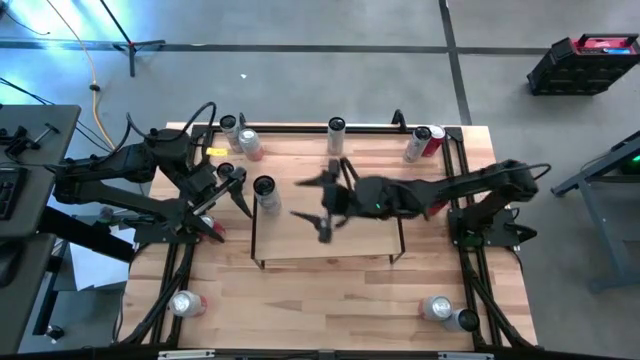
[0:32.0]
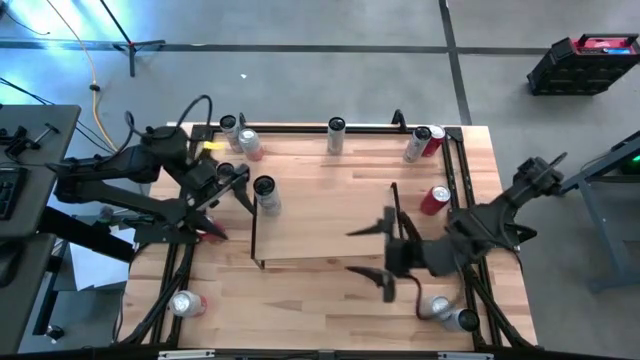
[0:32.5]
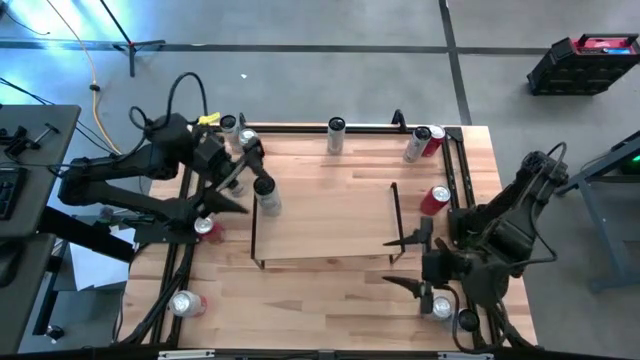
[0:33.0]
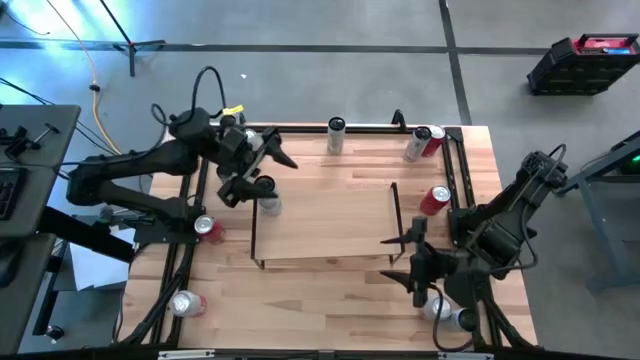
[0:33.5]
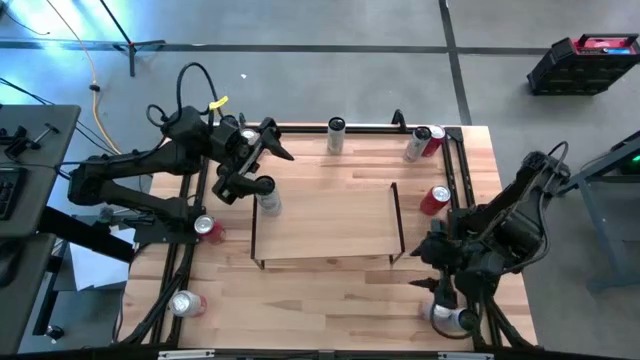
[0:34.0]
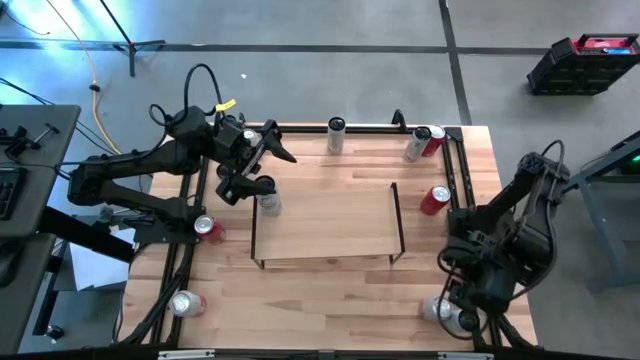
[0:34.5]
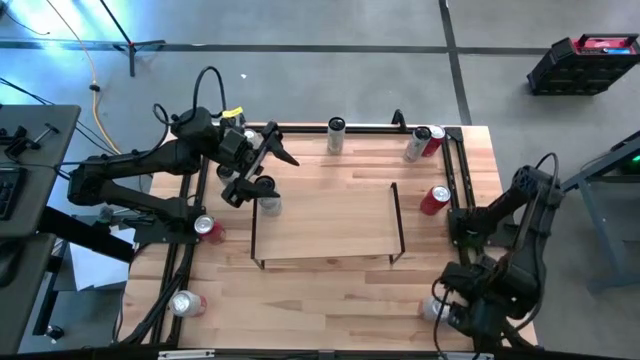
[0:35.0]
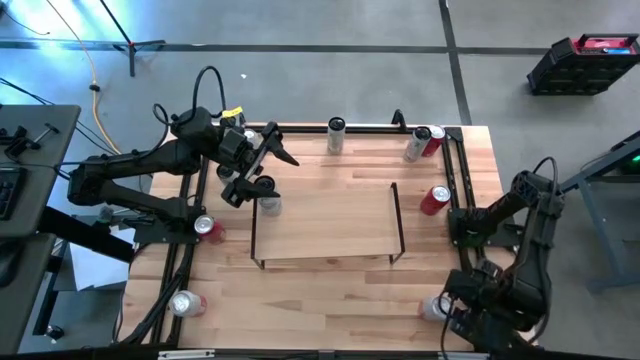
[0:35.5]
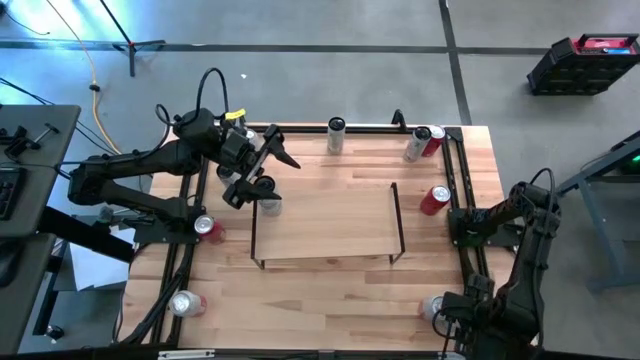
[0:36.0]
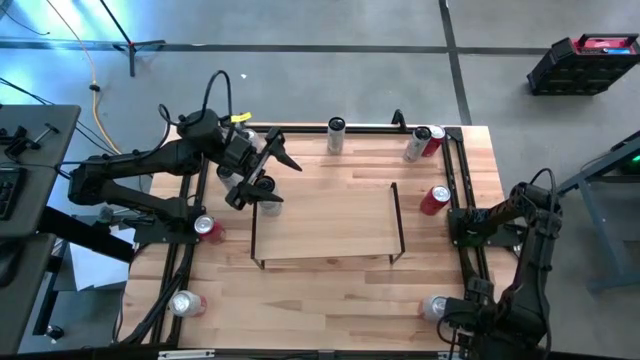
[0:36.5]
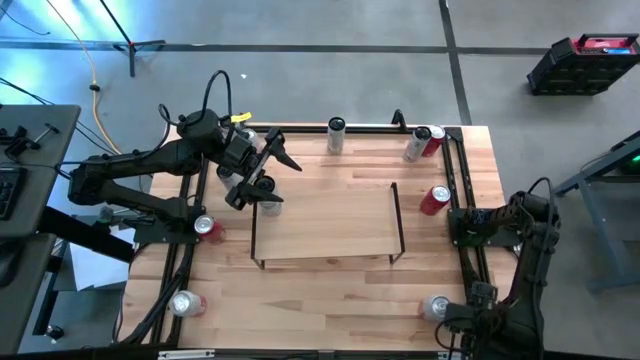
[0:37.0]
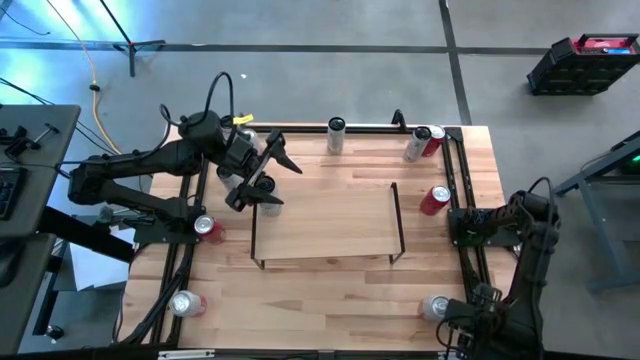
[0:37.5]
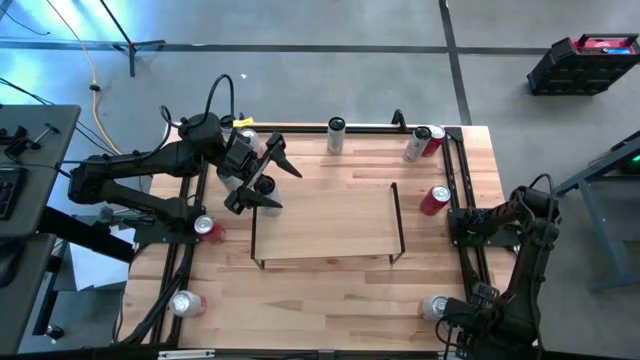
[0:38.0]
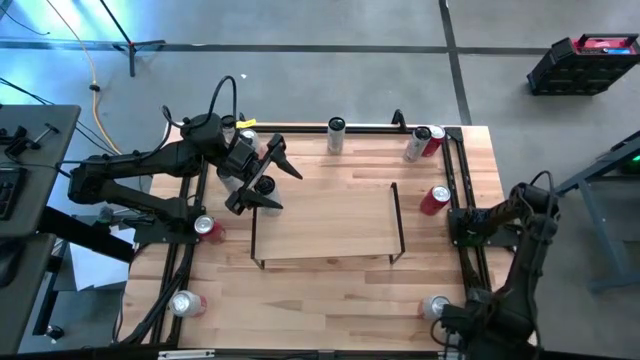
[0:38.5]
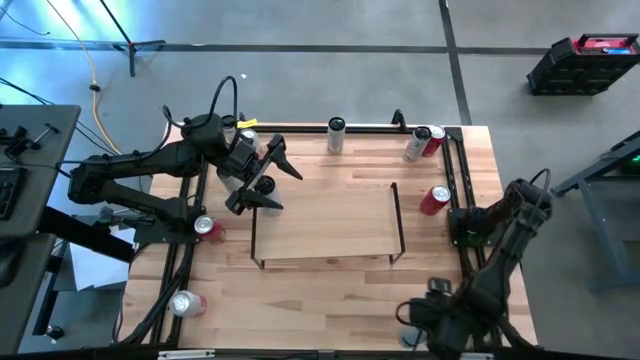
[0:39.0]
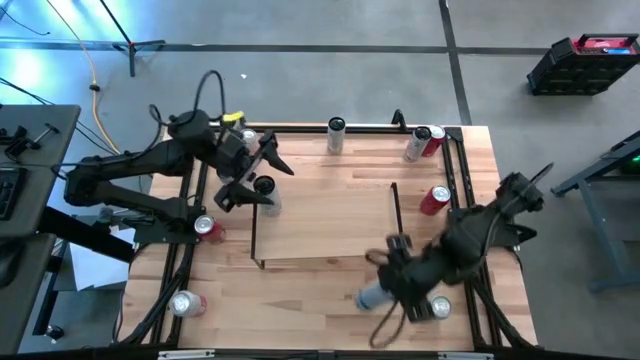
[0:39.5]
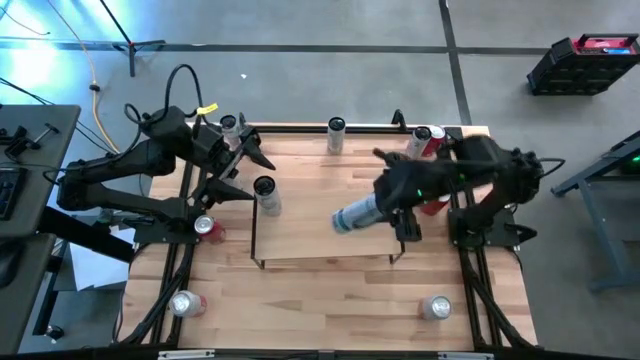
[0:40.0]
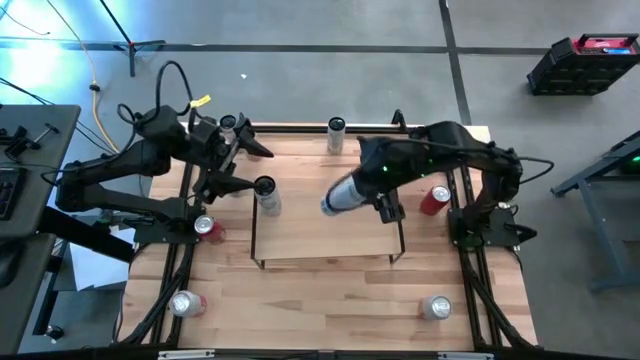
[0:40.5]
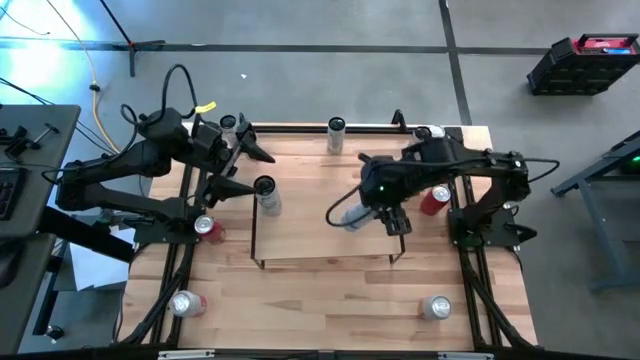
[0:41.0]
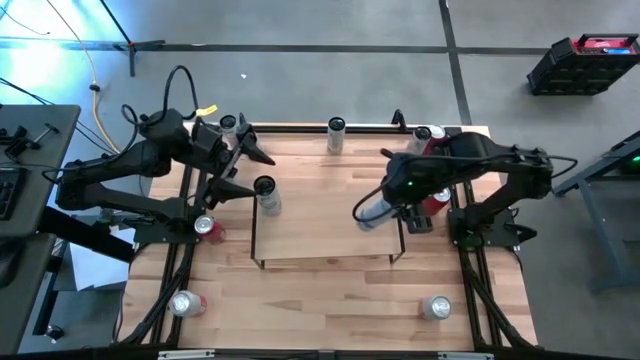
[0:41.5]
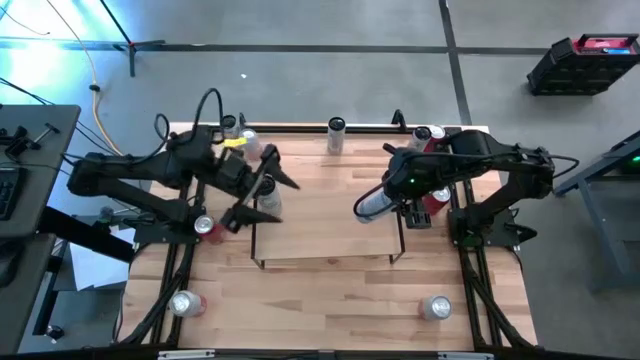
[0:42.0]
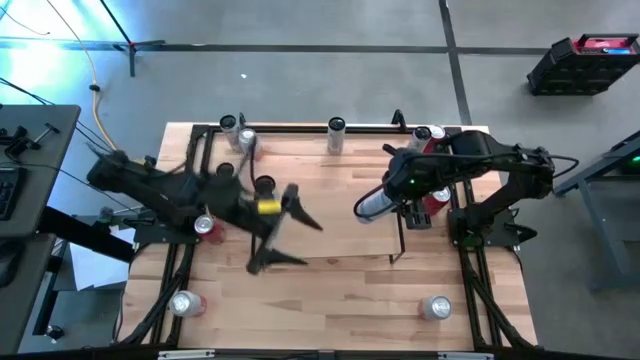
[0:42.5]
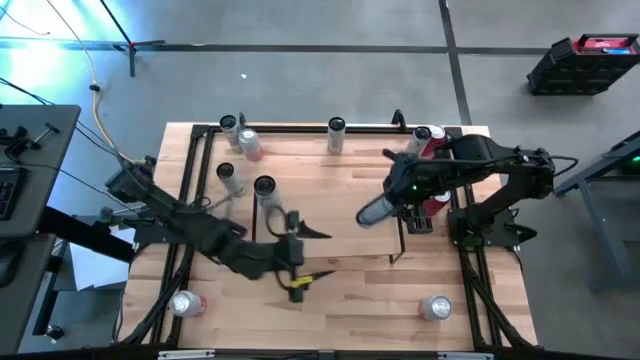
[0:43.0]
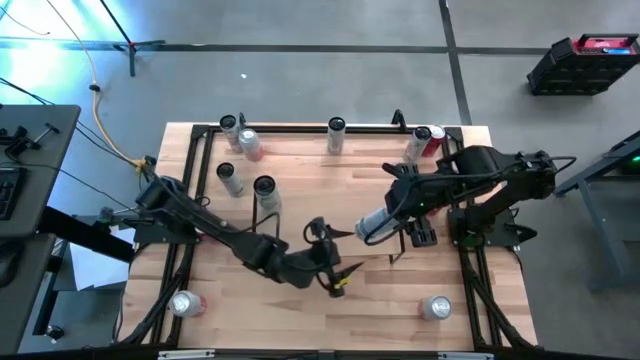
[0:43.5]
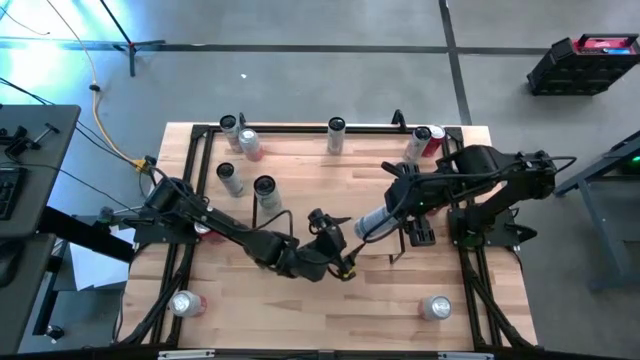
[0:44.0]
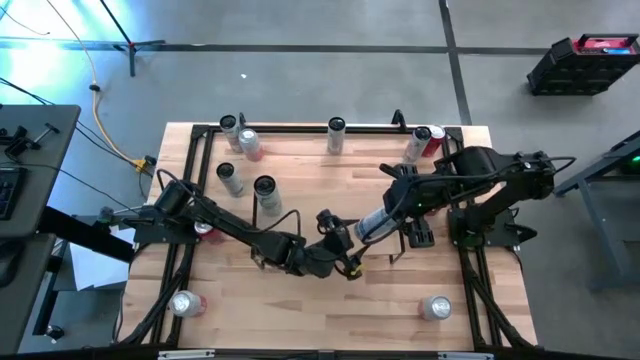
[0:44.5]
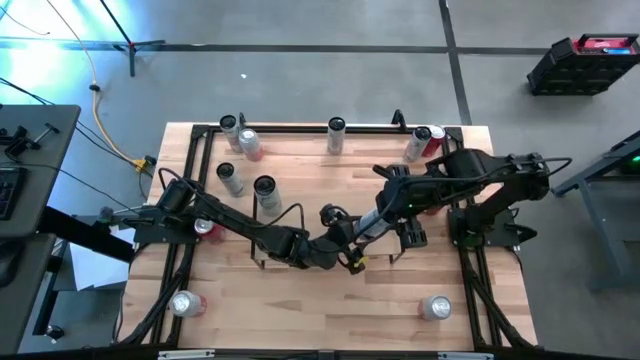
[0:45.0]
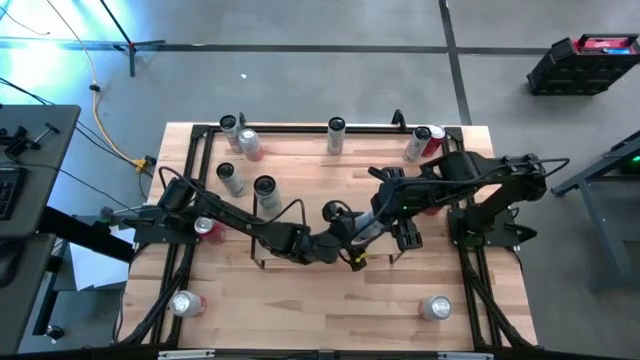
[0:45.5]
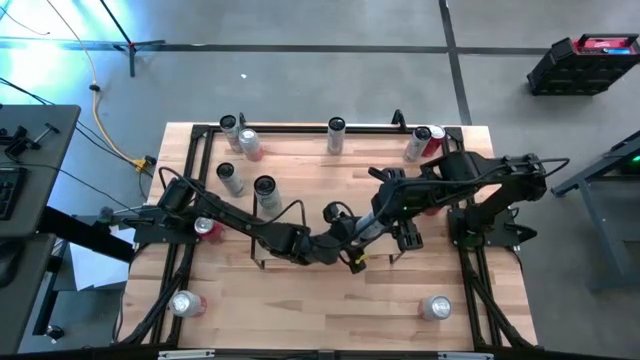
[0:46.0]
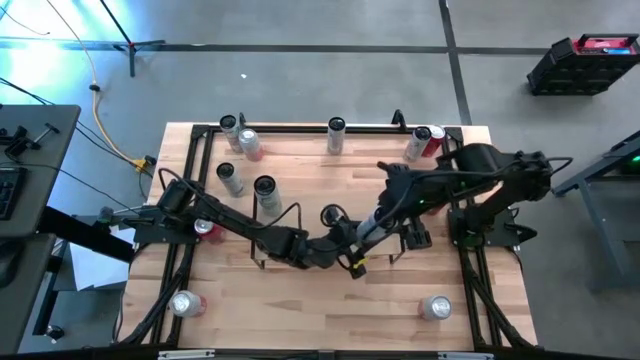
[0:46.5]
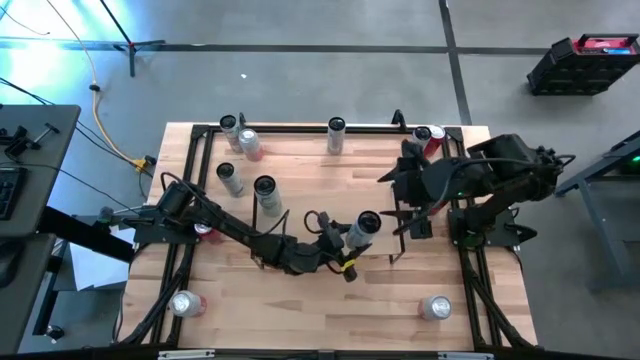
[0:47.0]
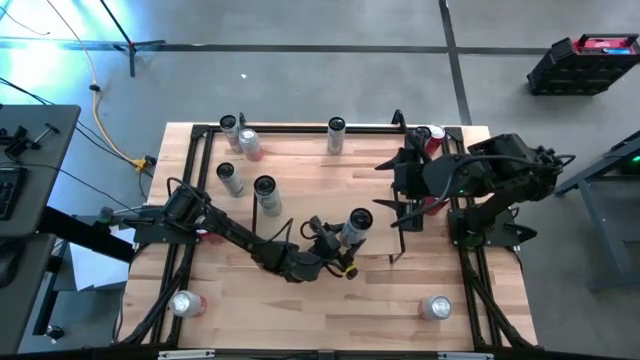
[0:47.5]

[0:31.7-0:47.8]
Task: Place canned beverage on shelf
Put the bottom white blue soda can aligned with the other white blue soda can on the shelf

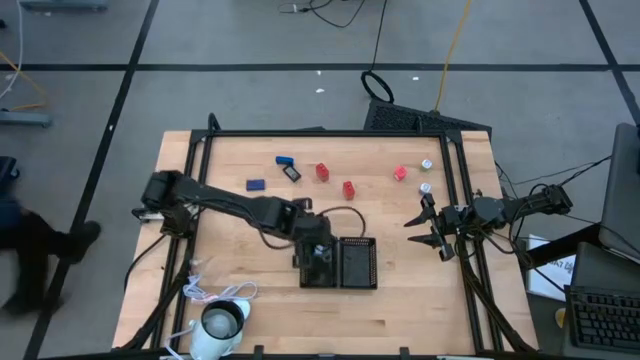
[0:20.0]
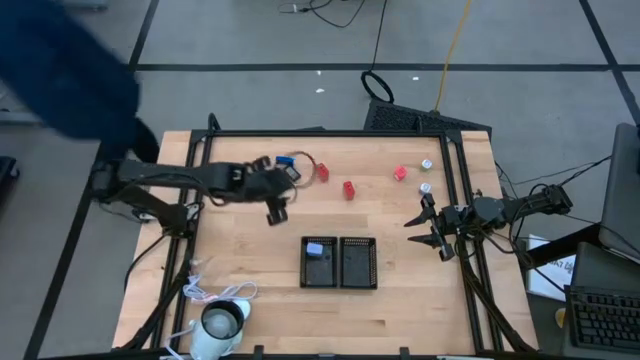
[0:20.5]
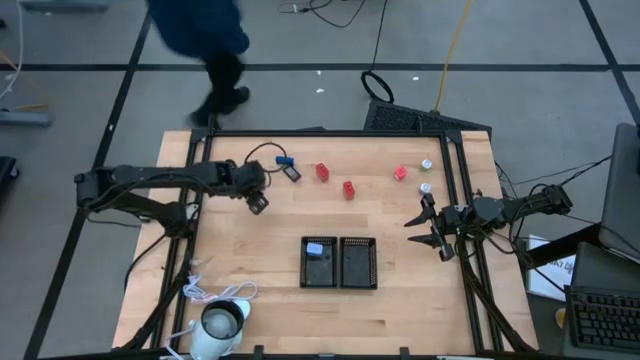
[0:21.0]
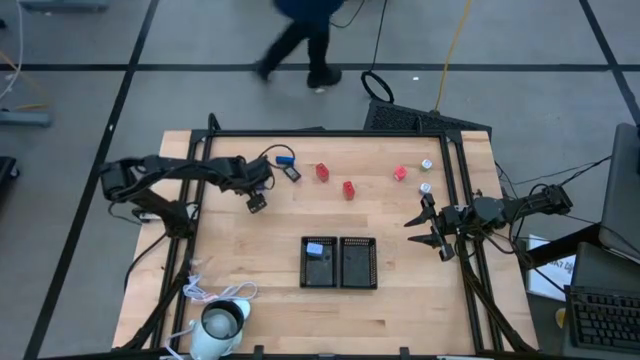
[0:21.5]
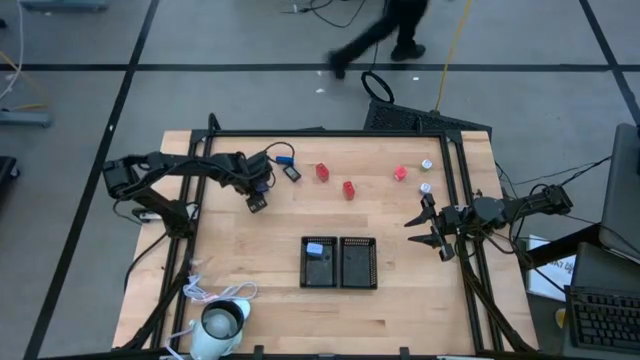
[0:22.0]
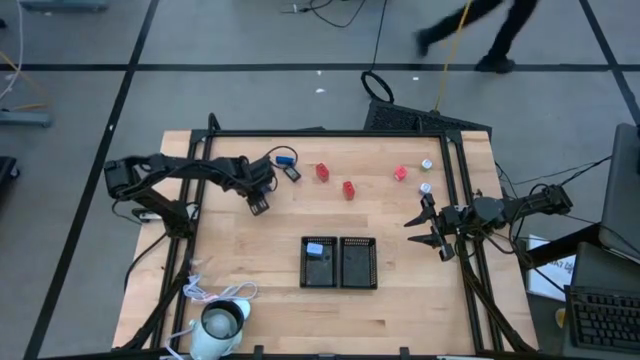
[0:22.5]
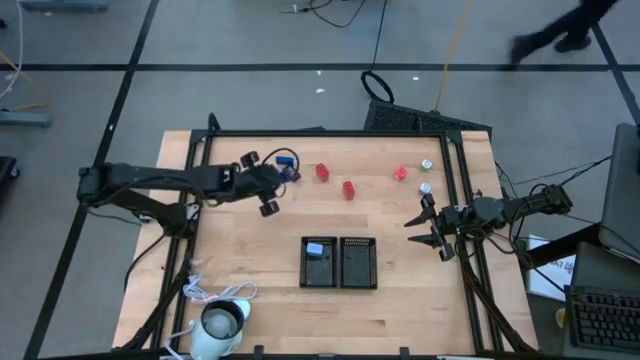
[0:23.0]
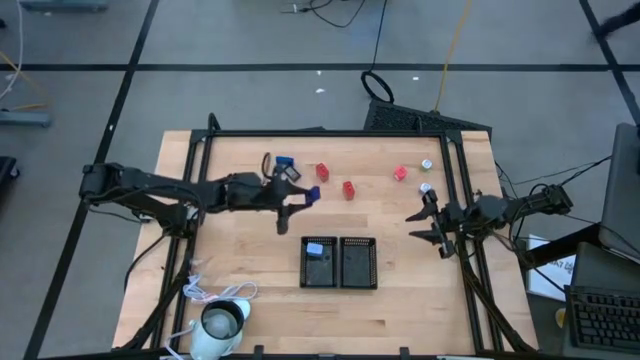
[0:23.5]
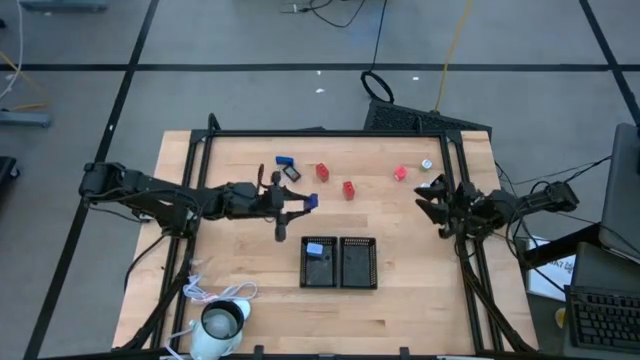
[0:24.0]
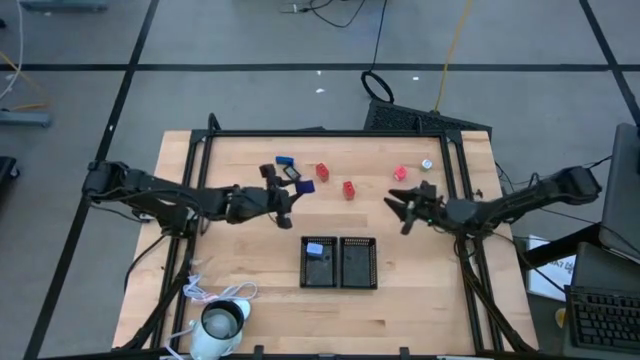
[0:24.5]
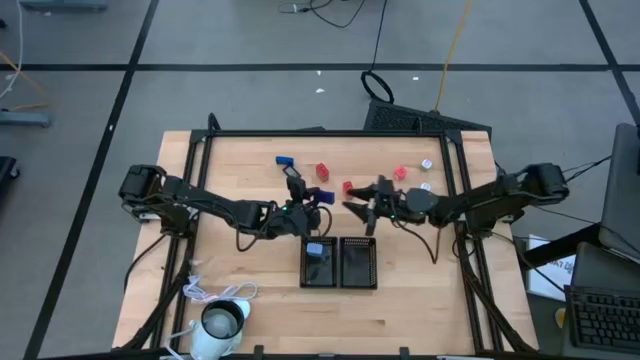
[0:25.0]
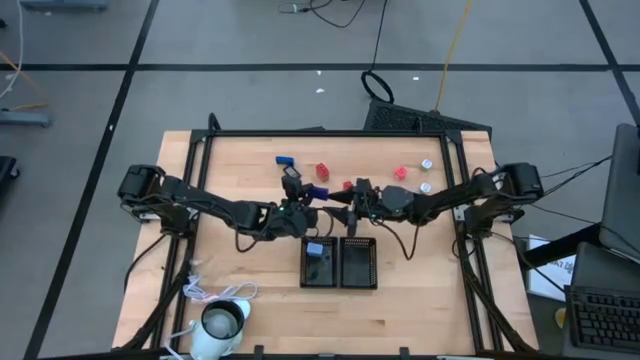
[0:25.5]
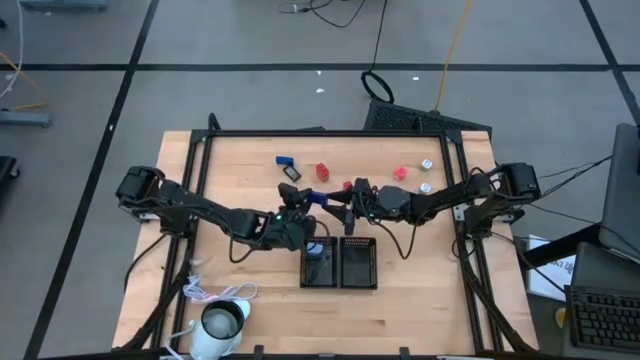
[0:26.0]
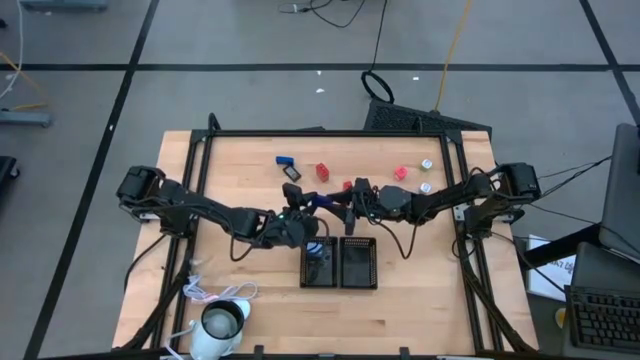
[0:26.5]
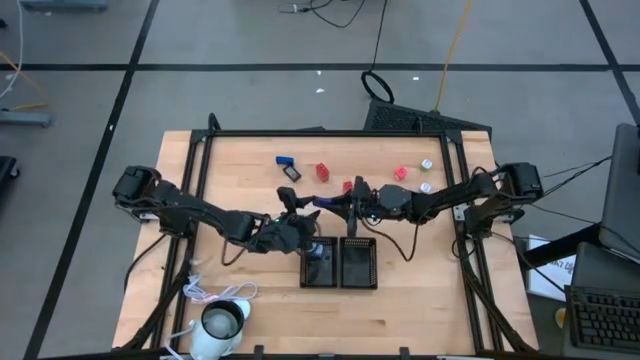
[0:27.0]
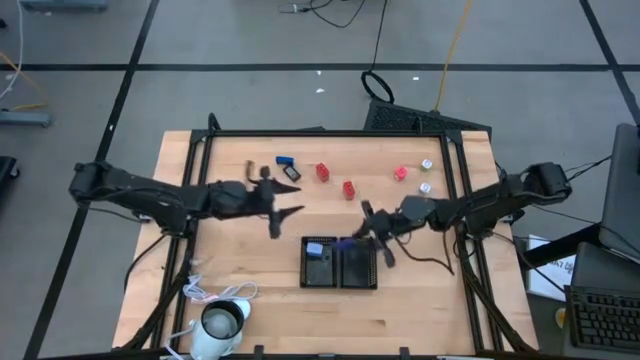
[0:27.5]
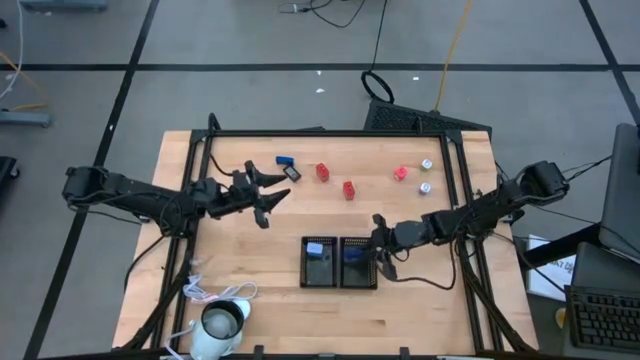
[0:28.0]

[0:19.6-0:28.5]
Task: Pick & Place Office items
Put the bottom blue digital clock into the right black basket
